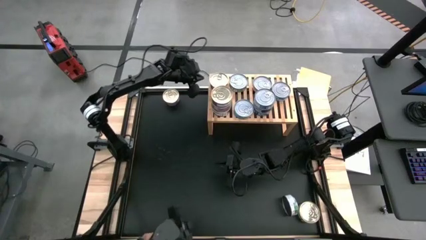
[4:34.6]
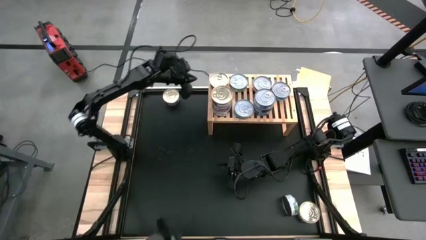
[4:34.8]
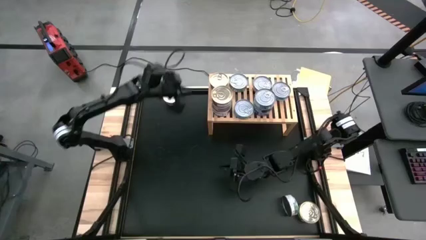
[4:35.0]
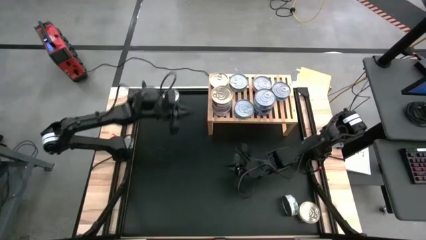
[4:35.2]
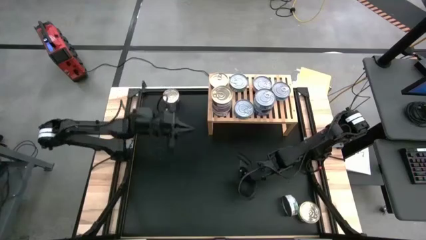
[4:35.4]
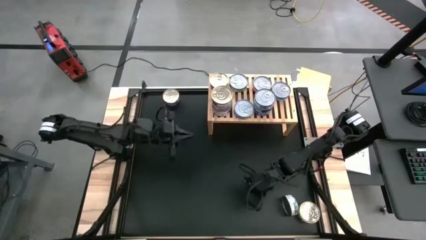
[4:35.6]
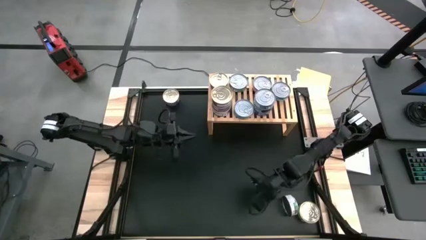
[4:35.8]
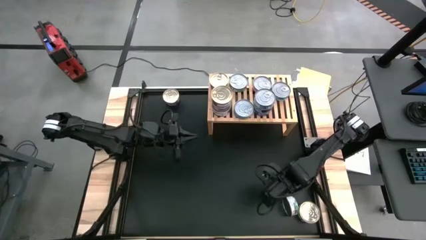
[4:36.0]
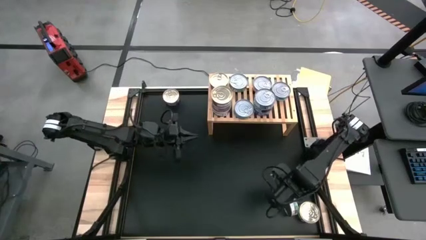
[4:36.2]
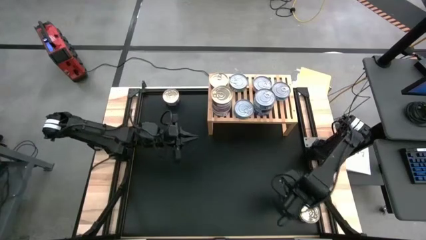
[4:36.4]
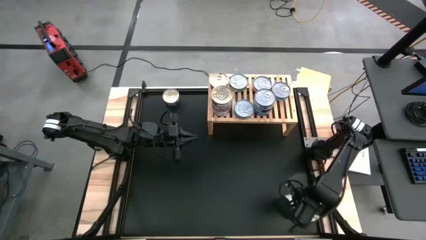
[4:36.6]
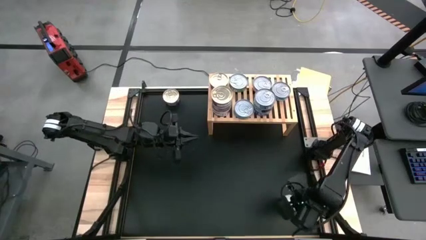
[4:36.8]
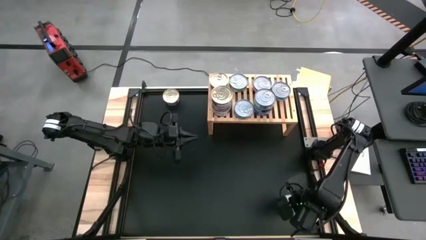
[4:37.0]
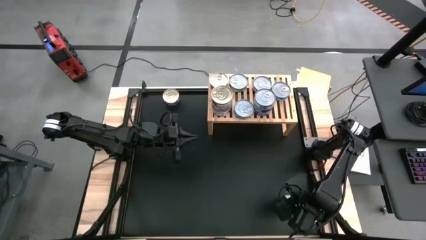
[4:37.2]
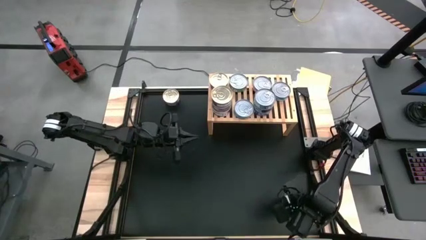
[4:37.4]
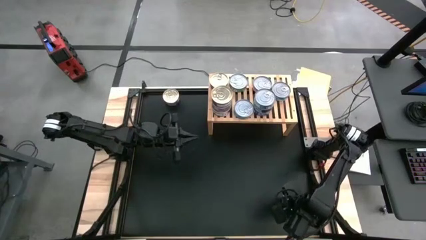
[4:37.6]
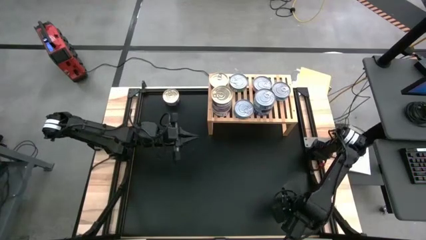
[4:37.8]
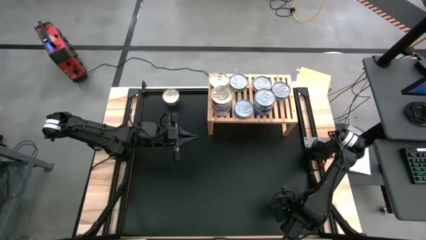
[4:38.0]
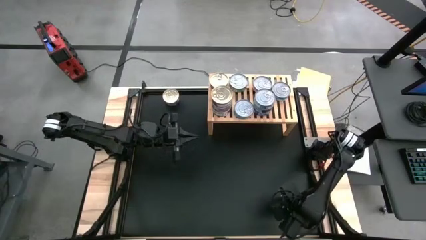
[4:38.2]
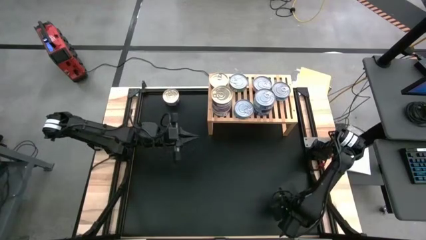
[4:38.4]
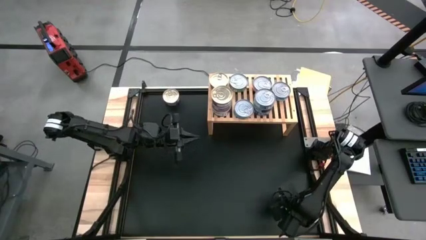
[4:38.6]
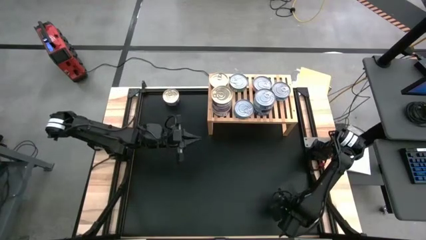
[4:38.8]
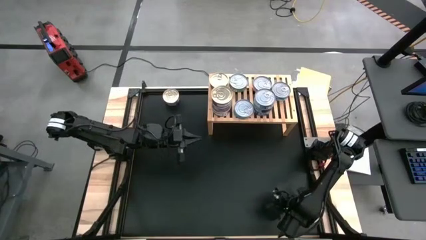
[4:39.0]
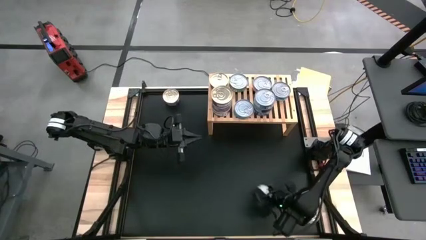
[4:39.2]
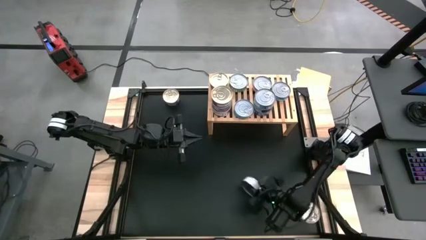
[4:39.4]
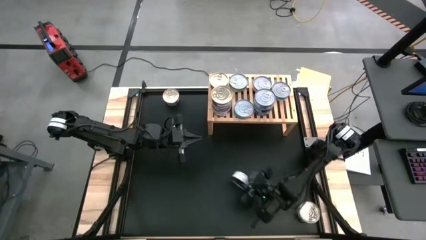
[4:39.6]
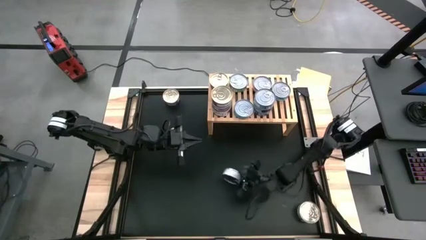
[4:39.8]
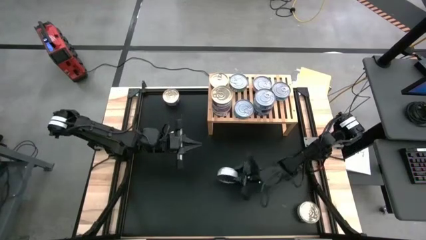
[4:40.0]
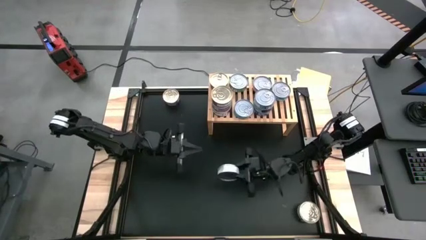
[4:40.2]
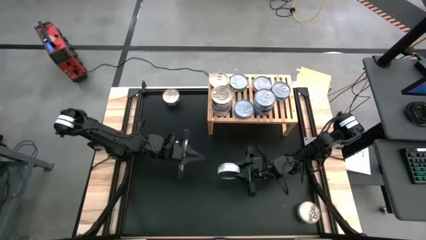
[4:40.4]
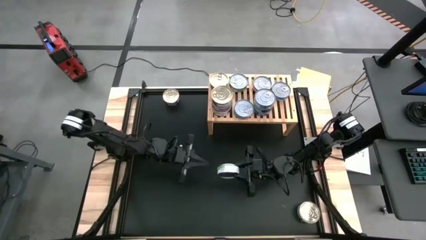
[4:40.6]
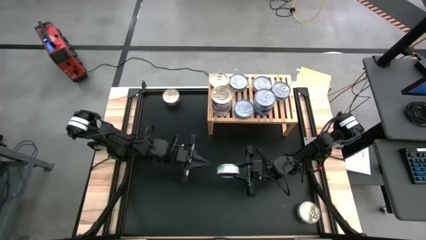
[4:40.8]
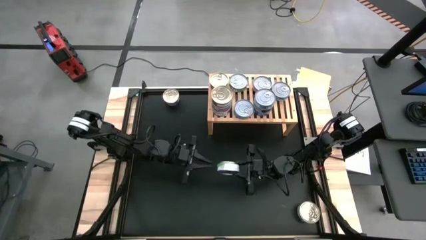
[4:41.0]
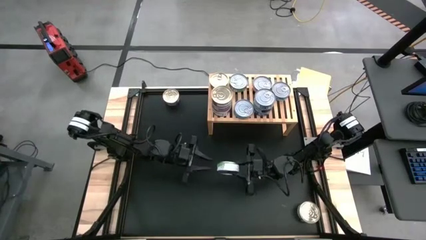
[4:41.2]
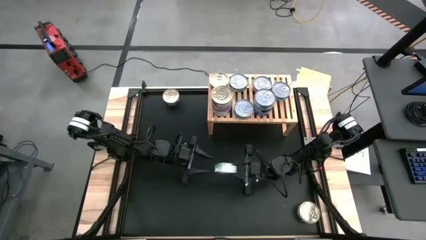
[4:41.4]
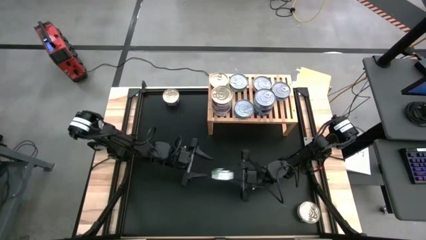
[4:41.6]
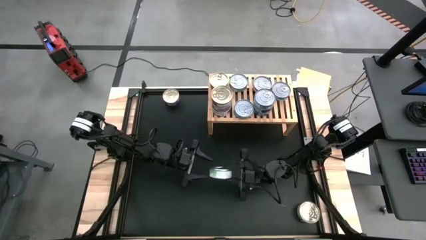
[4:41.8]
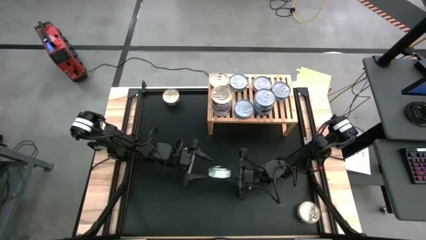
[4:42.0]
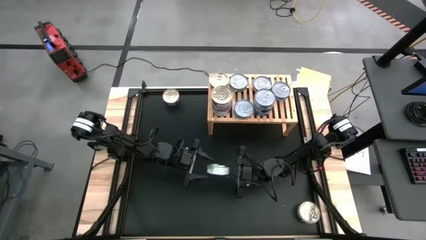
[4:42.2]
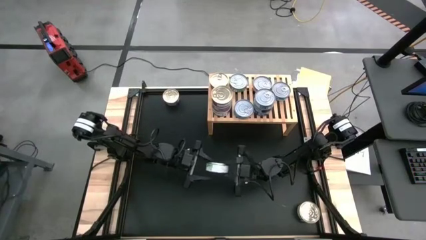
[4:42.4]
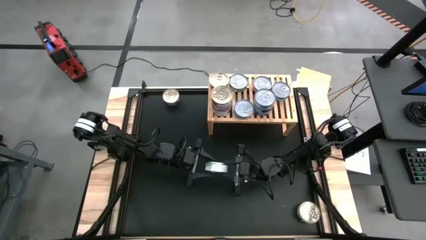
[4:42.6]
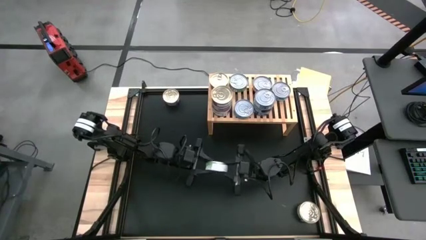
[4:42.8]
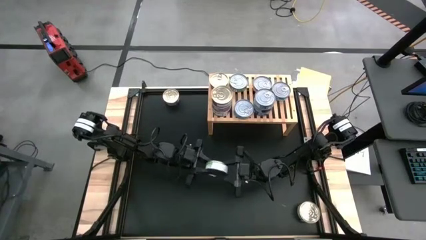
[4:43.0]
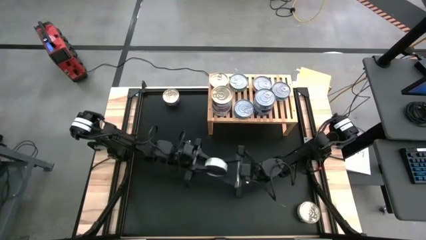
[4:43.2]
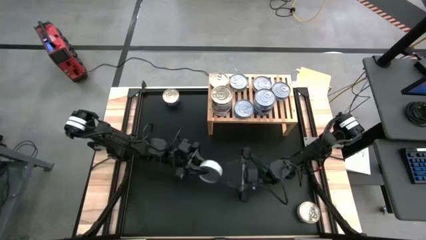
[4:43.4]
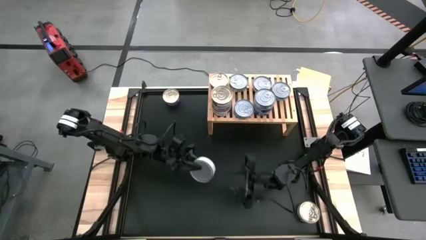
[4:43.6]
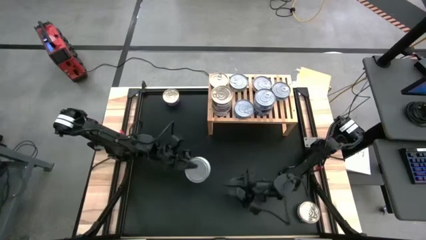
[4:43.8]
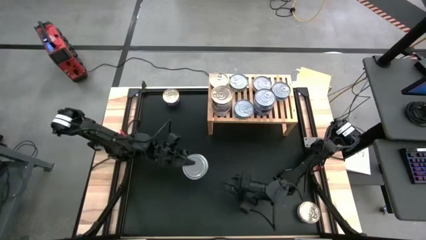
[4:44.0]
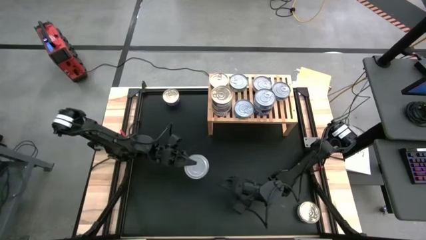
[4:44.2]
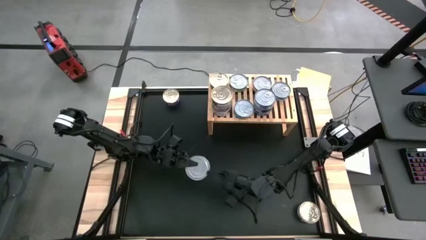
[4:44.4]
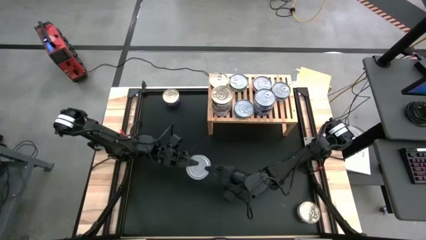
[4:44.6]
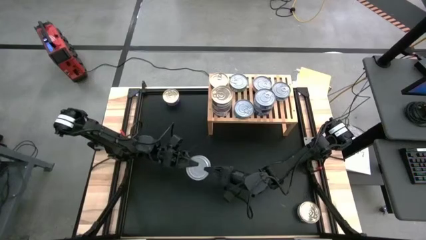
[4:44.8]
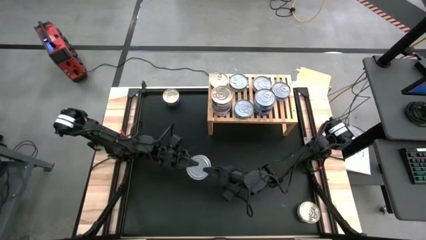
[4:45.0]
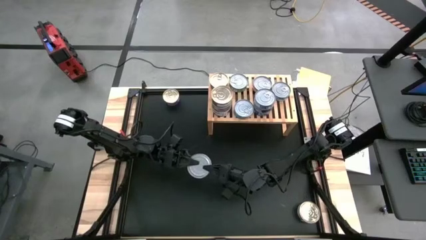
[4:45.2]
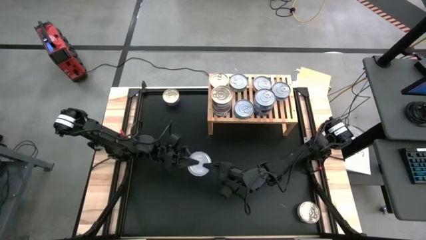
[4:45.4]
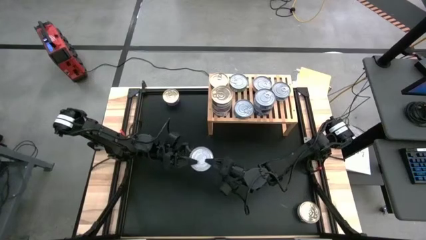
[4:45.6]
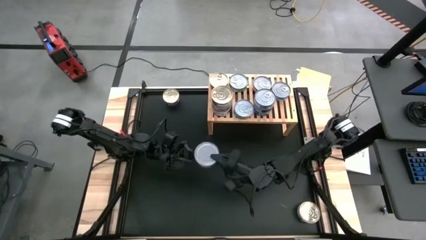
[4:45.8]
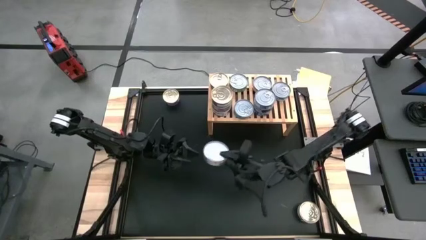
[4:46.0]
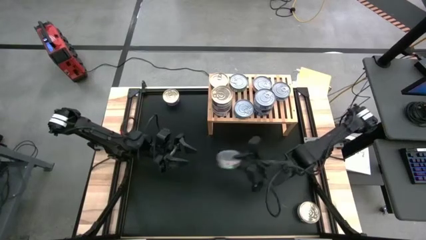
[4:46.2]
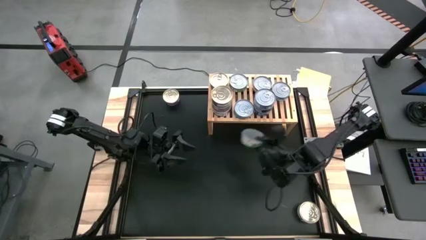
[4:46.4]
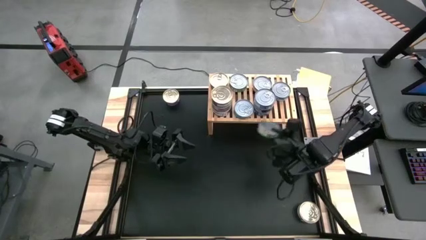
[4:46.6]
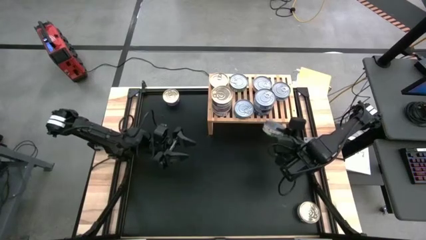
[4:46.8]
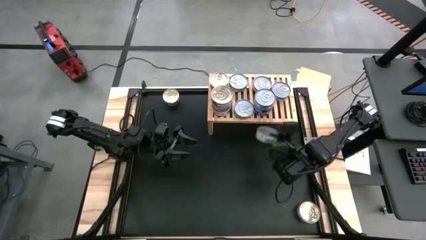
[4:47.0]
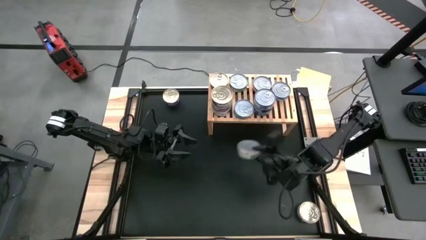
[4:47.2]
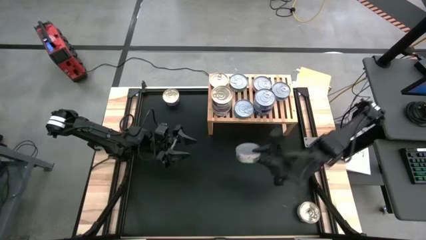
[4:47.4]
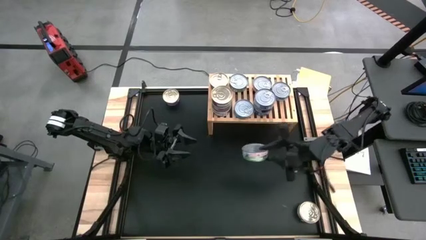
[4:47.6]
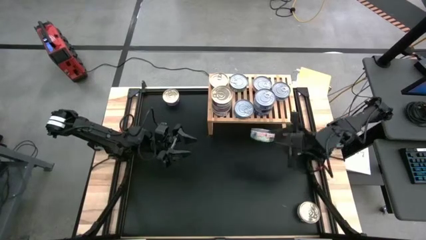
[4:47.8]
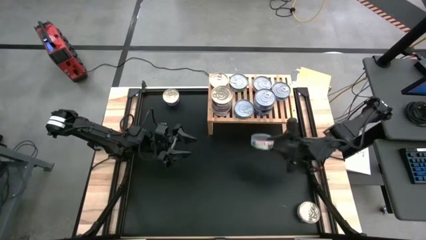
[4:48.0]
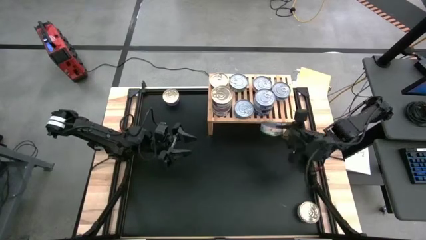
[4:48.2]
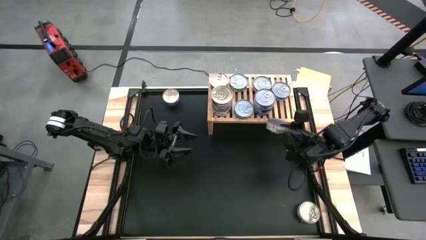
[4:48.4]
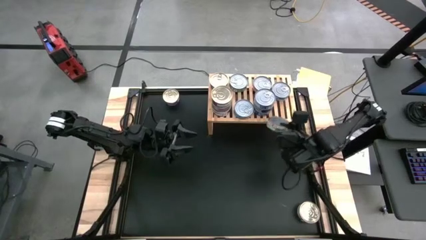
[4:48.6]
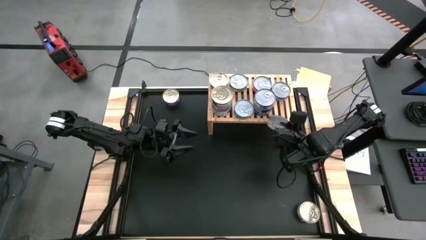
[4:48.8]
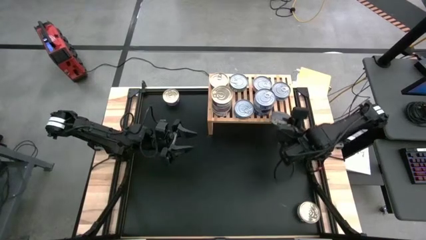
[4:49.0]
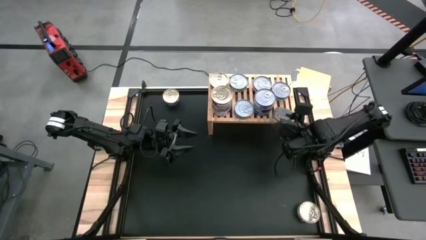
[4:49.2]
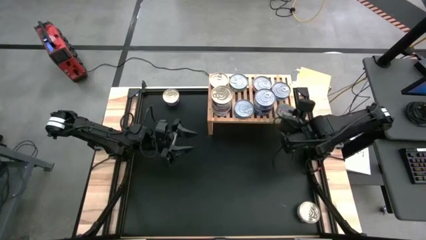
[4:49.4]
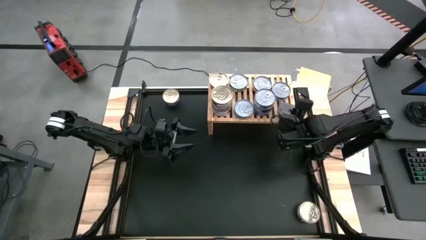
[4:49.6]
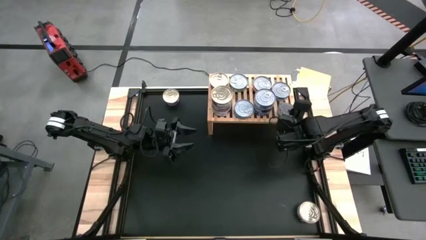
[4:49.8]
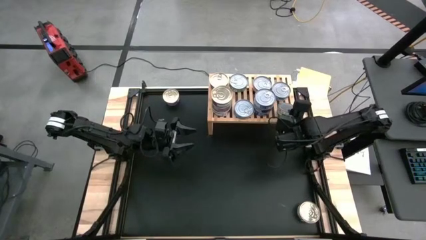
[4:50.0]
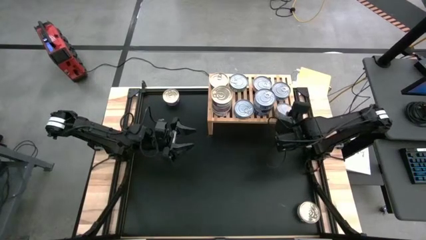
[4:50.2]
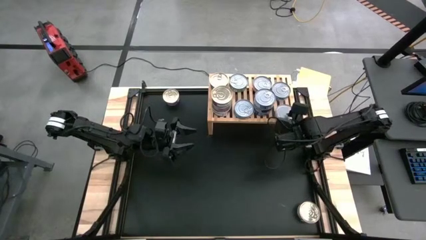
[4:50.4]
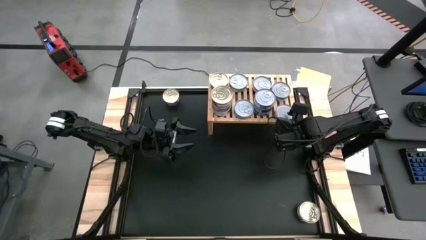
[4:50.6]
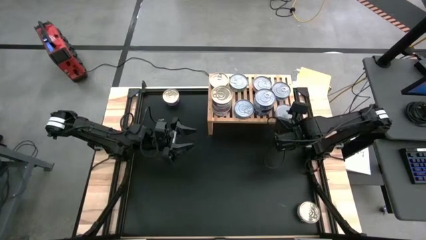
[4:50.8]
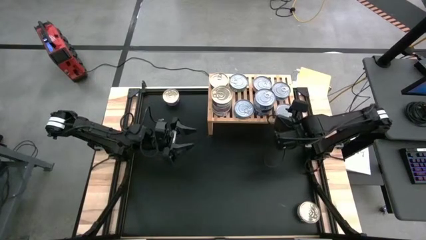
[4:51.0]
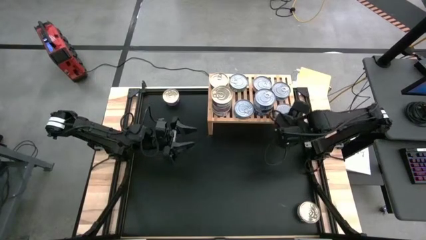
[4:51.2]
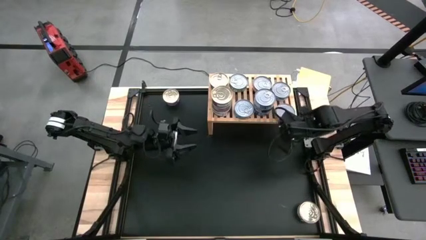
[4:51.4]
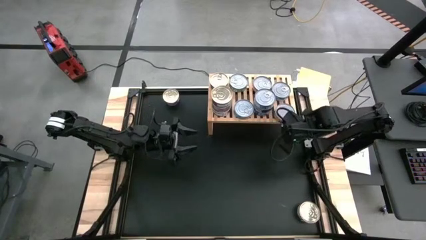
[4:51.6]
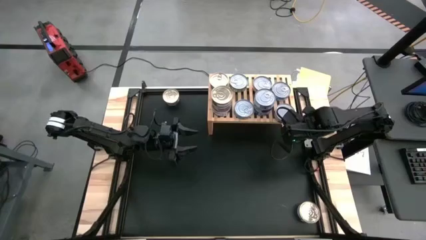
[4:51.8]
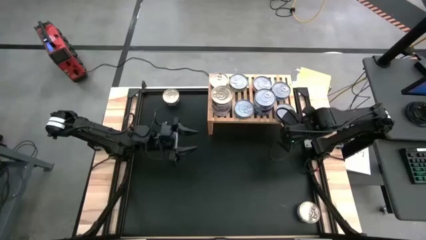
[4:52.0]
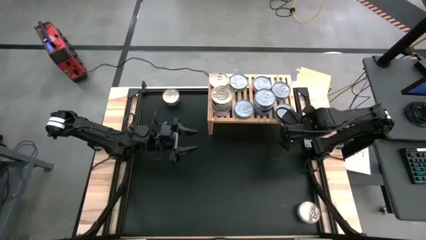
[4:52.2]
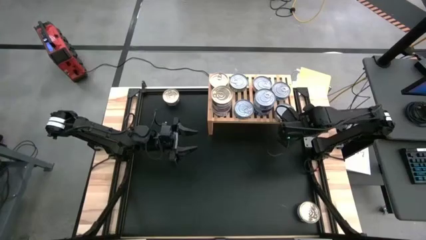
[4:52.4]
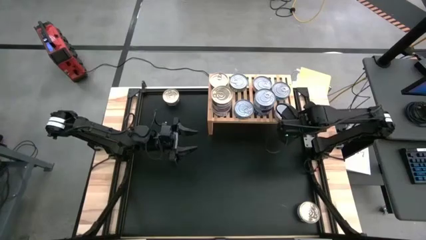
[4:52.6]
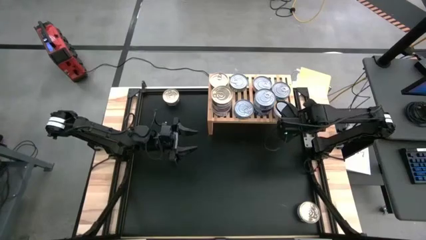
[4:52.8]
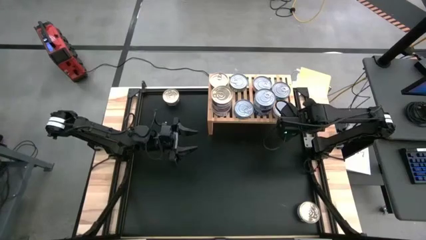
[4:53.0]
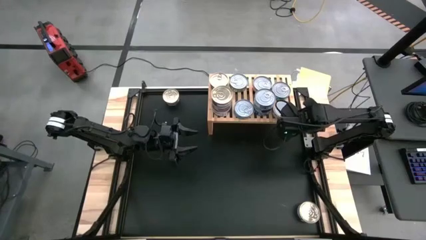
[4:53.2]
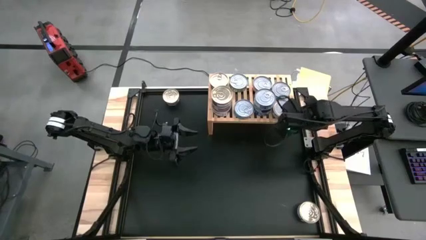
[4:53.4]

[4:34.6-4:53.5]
Task: Stack canned seafood by type on shelf
Put the green tuna can on the shelf
